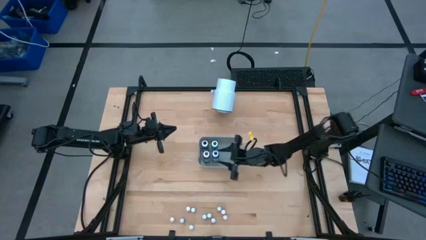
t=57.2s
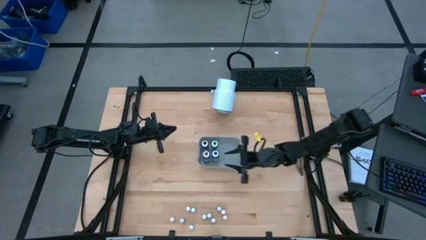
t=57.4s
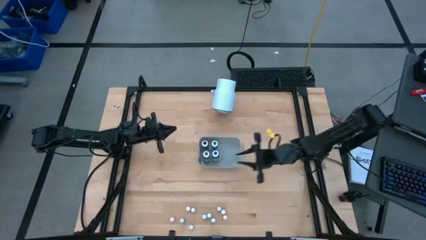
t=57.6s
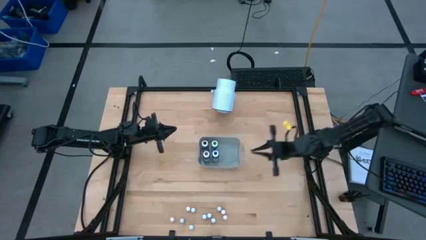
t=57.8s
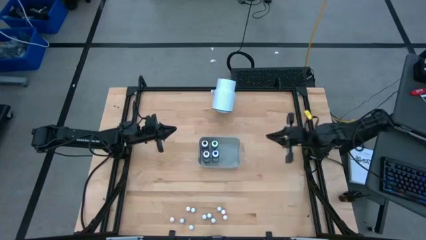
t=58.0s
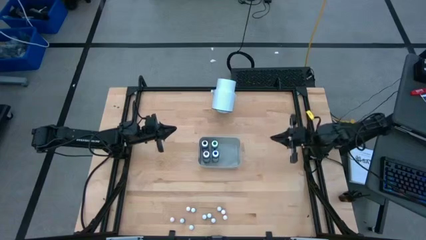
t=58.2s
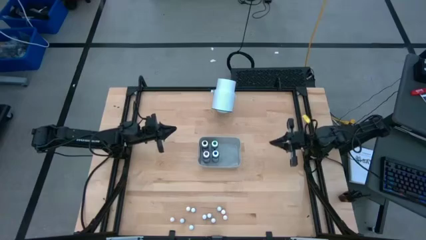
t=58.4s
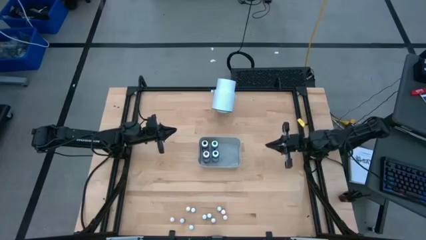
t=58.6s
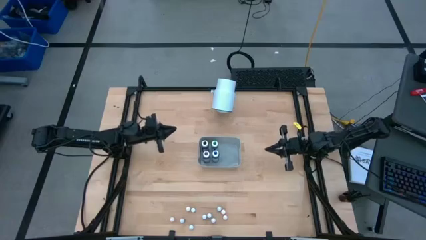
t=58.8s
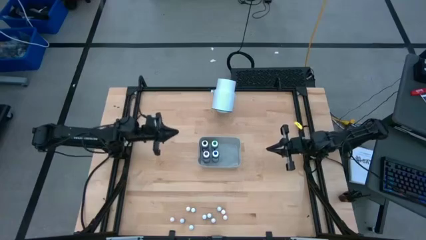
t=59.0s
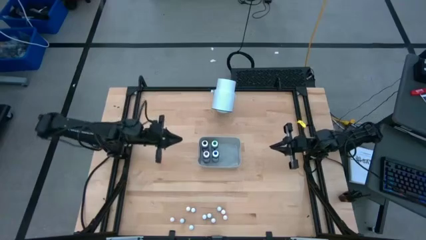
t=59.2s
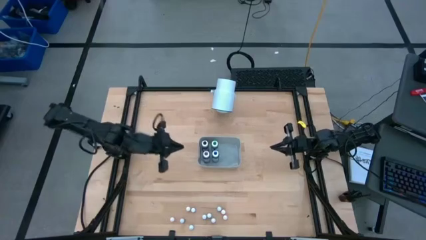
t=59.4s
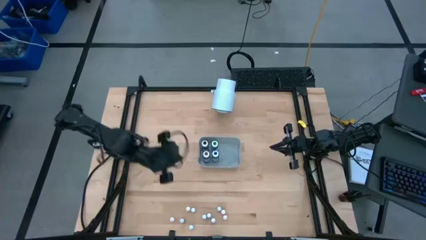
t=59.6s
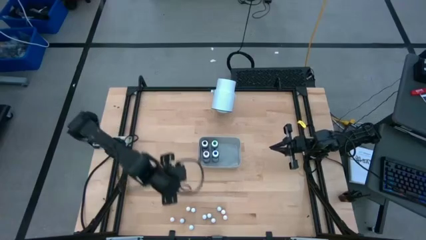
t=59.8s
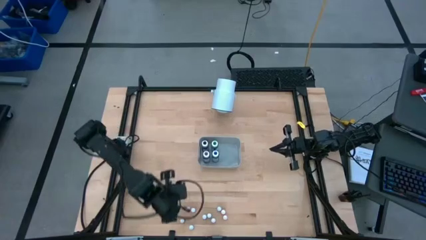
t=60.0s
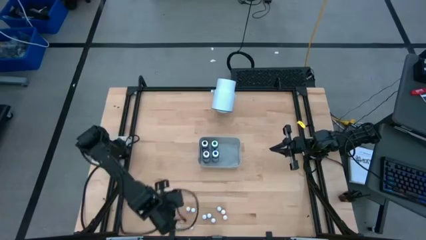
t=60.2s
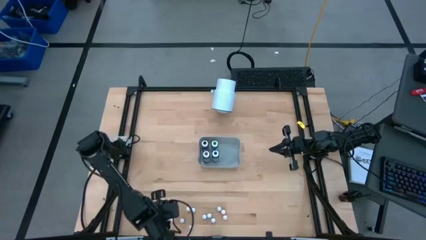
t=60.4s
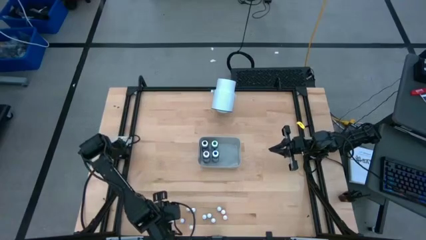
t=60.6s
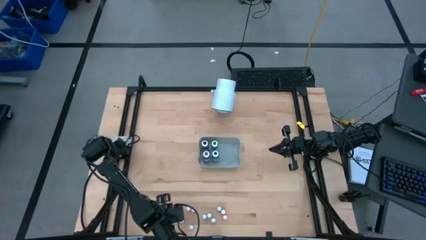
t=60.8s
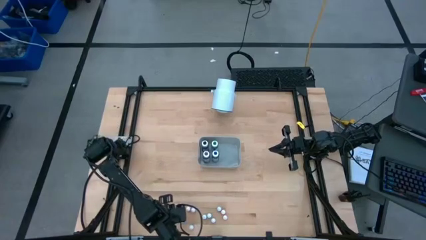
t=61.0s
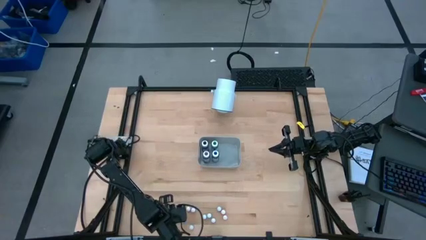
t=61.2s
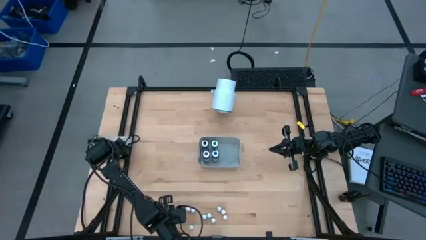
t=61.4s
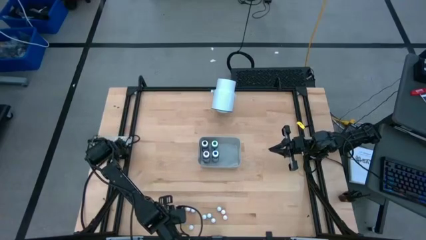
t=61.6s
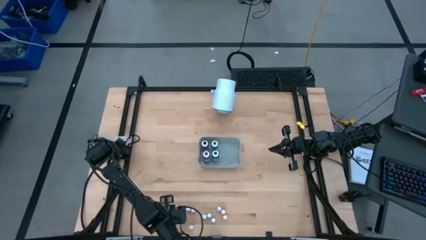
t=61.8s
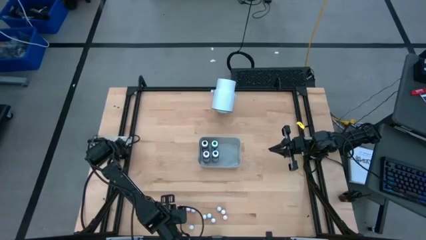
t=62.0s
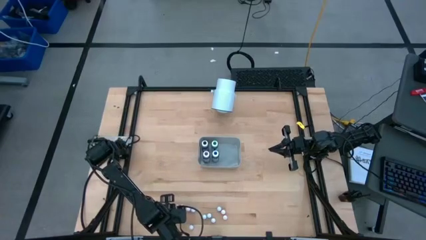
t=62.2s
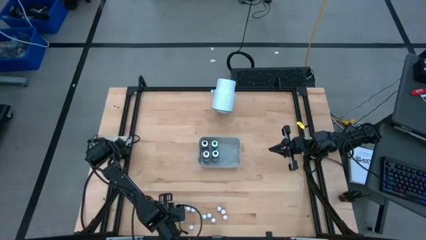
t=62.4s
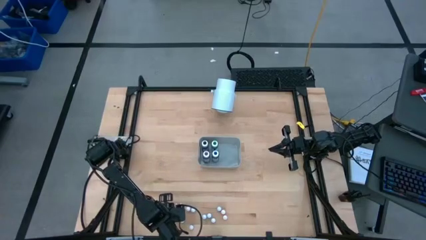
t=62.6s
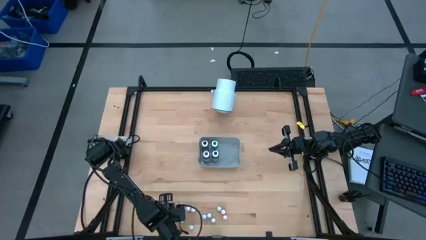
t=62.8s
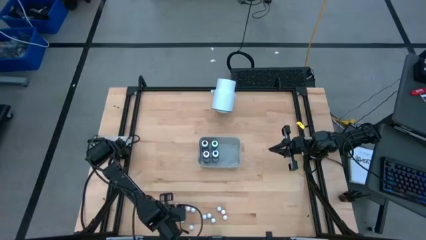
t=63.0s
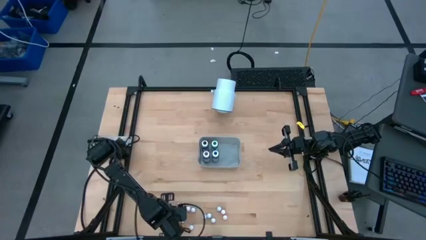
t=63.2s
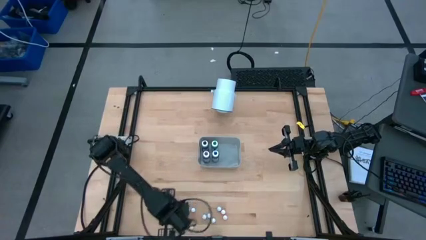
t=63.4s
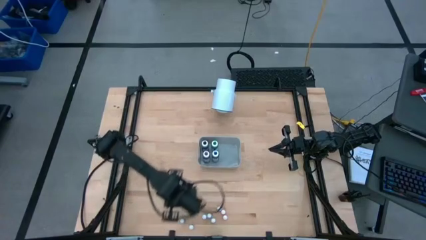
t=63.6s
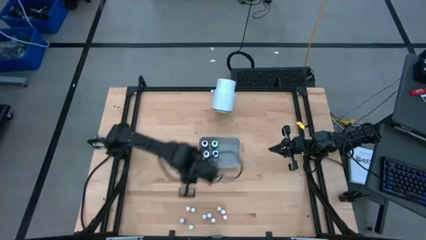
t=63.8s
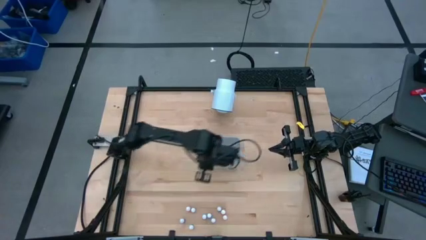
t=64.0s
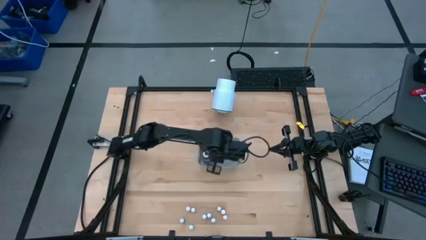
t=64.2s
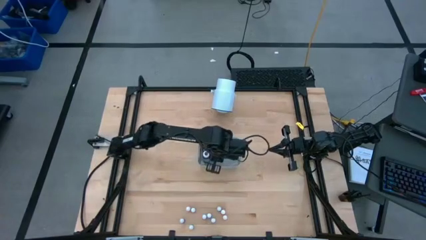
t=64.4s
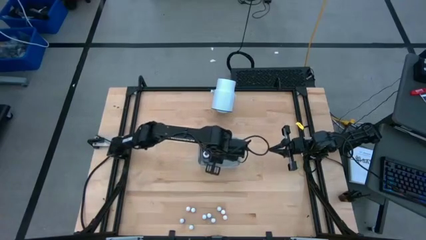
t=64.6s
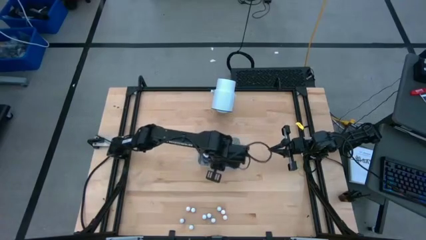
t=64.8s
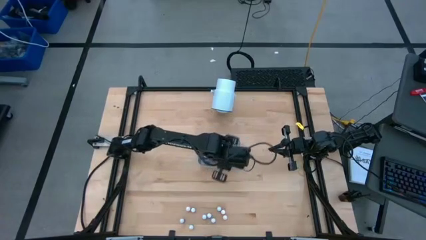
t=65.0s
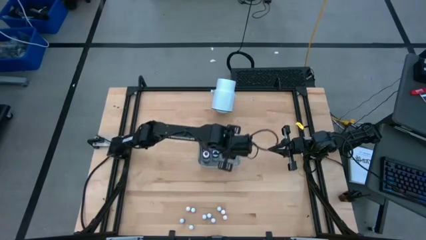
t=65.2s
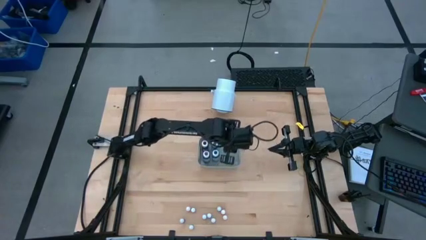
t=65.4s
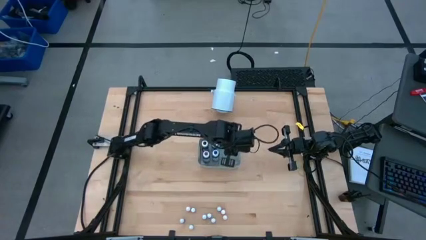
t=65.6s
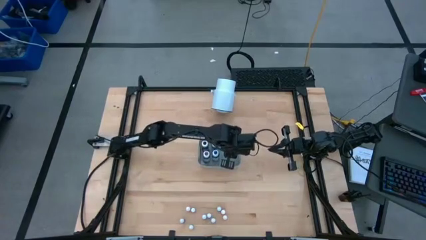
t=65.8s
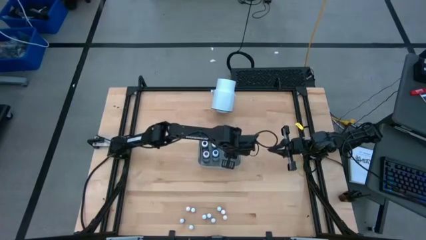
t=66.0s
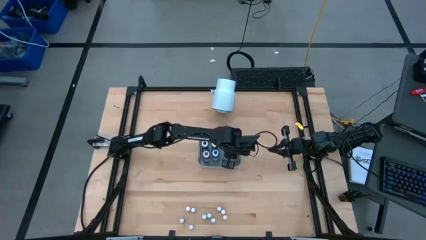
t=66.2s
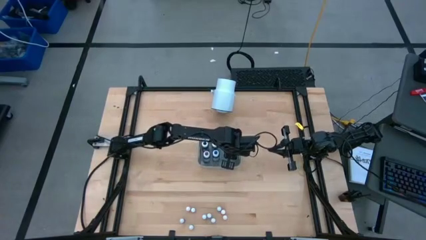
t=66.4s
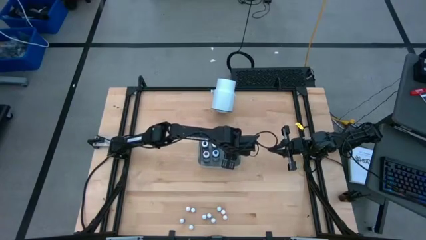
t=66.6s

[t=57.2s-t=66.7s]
Task: Pick & Place food coloring
Put the small yellow food coloring bottle into the gray bin

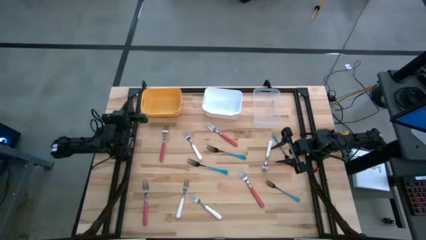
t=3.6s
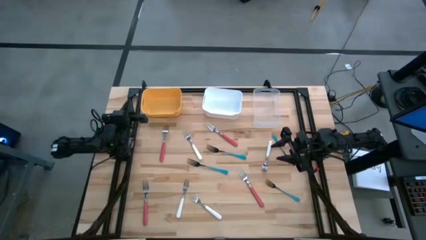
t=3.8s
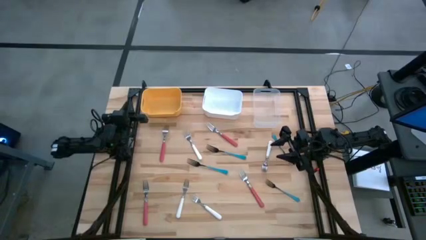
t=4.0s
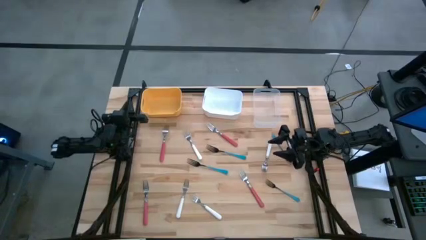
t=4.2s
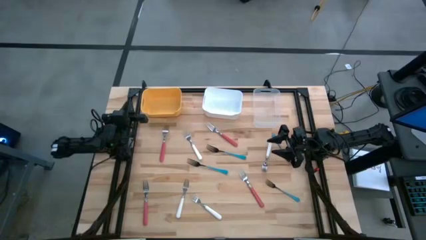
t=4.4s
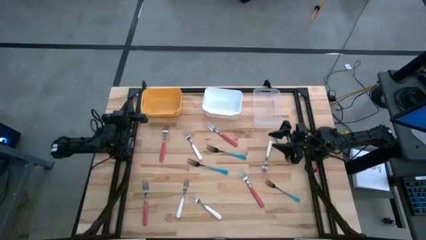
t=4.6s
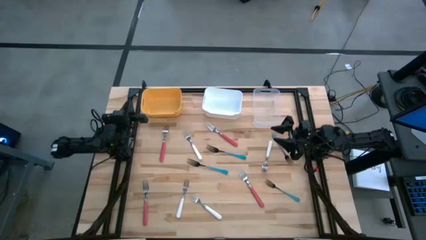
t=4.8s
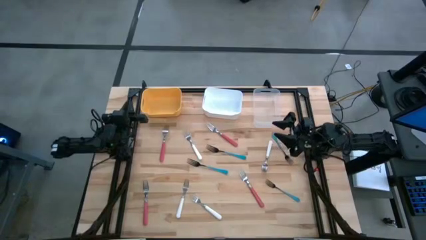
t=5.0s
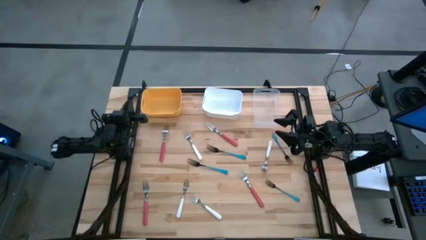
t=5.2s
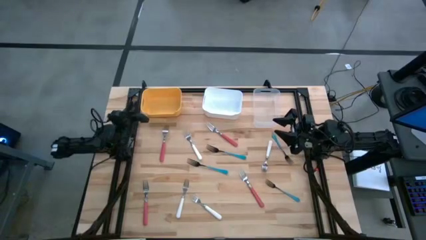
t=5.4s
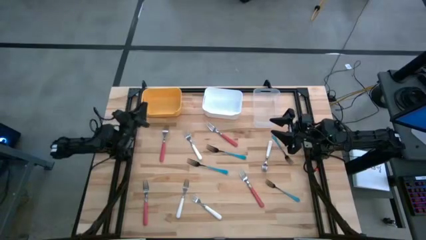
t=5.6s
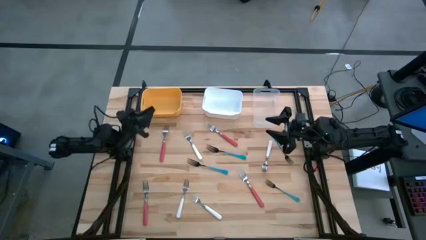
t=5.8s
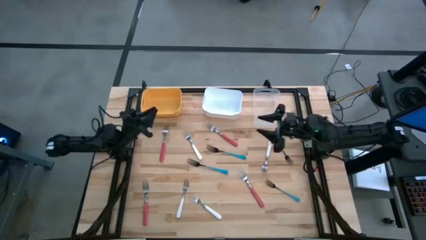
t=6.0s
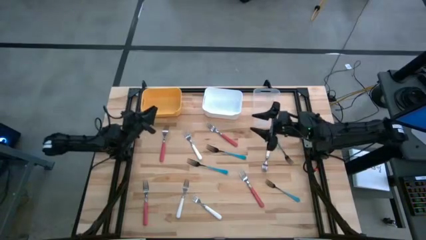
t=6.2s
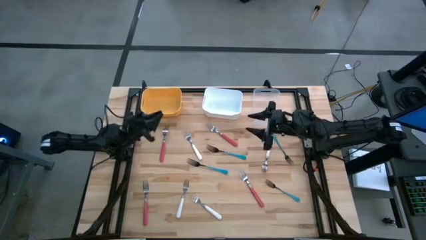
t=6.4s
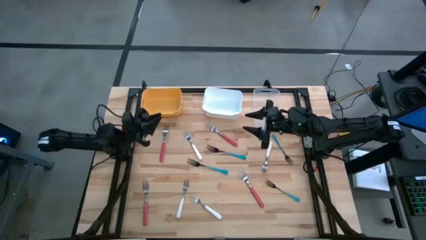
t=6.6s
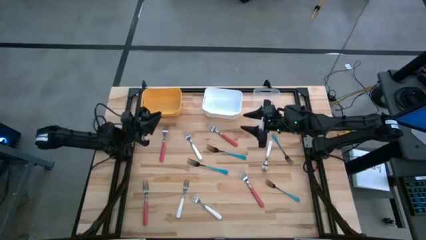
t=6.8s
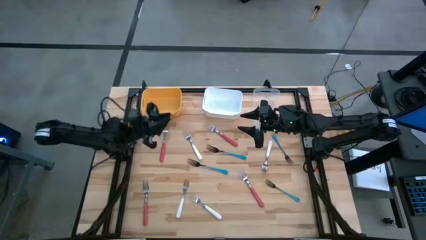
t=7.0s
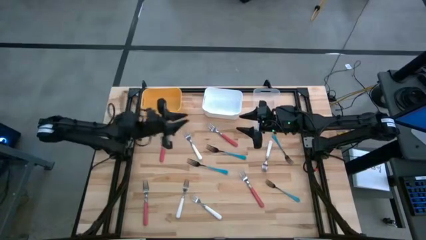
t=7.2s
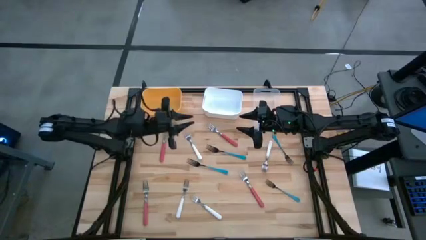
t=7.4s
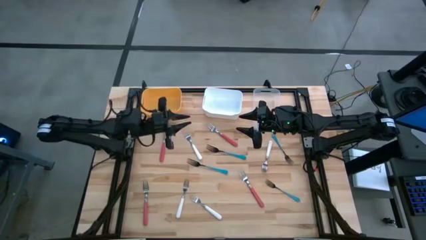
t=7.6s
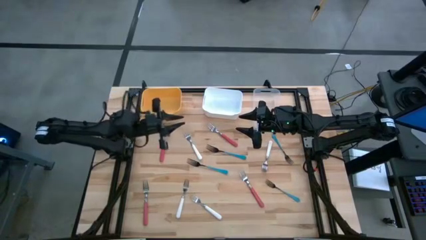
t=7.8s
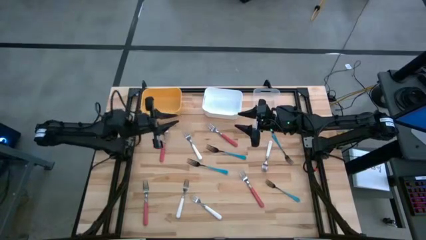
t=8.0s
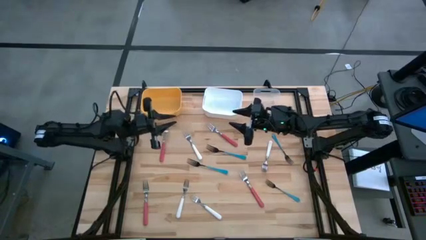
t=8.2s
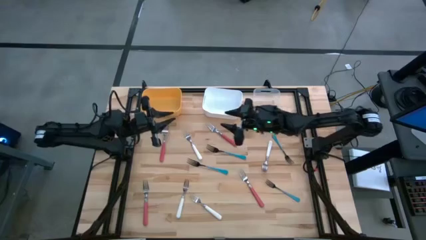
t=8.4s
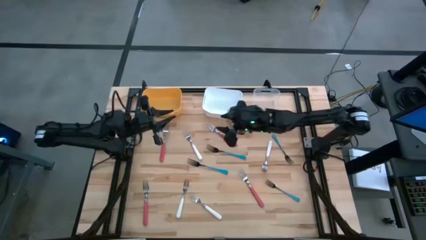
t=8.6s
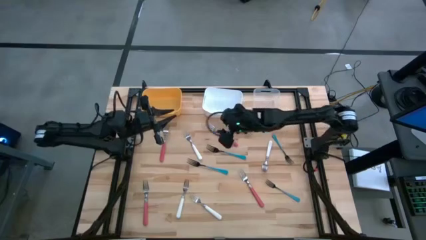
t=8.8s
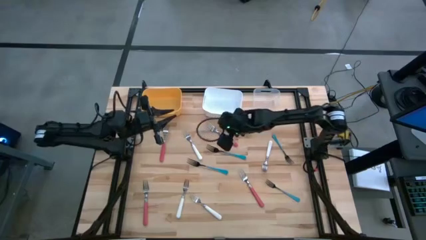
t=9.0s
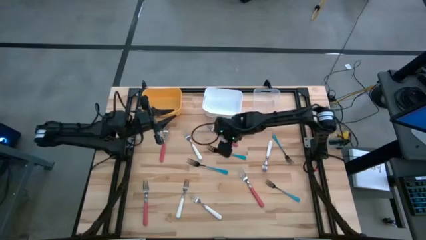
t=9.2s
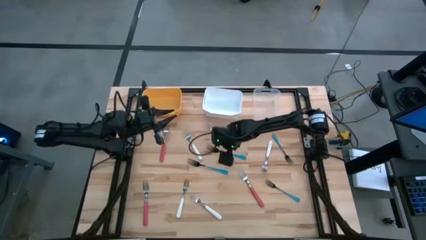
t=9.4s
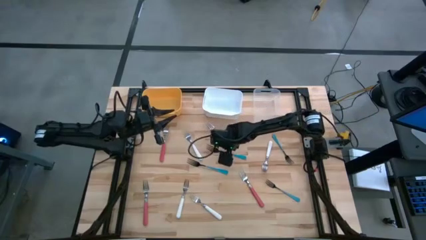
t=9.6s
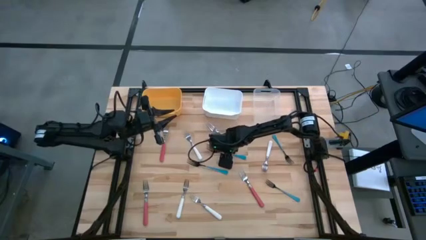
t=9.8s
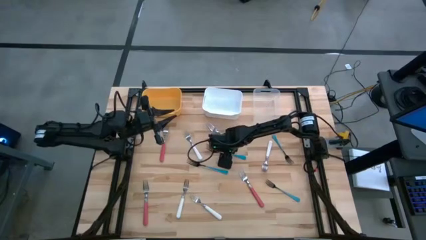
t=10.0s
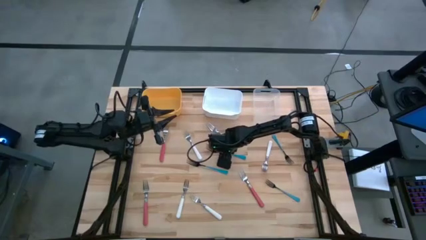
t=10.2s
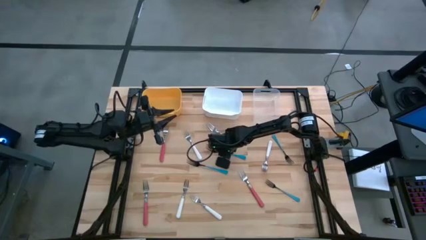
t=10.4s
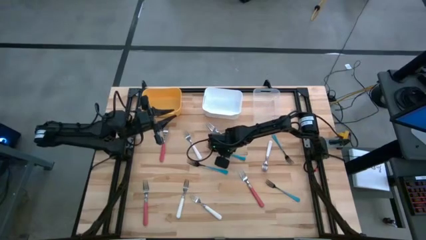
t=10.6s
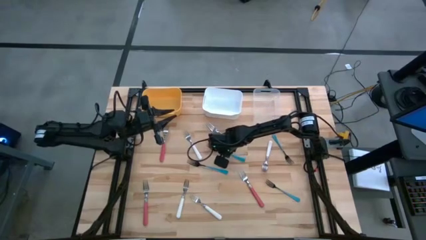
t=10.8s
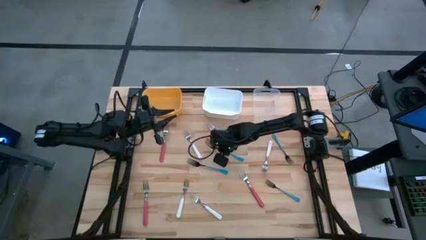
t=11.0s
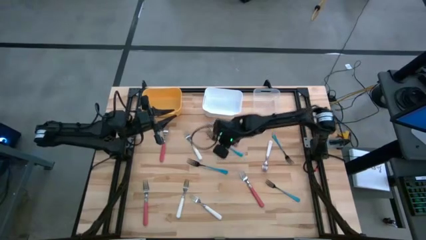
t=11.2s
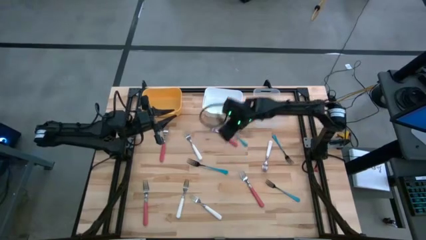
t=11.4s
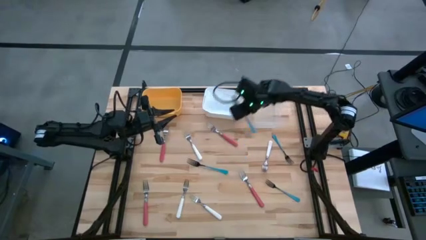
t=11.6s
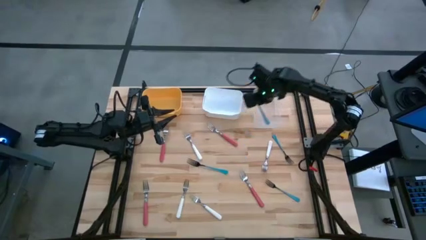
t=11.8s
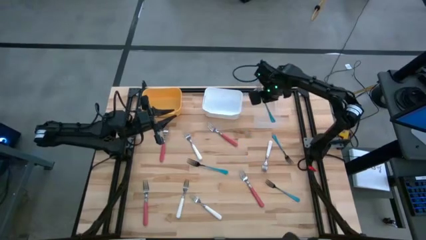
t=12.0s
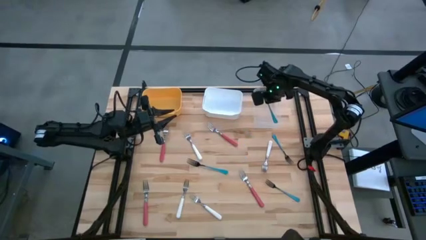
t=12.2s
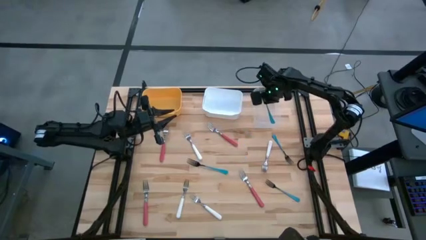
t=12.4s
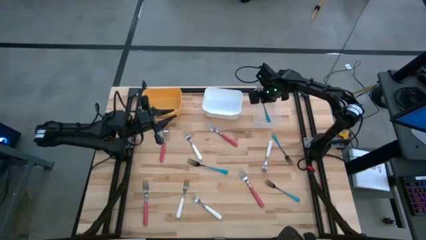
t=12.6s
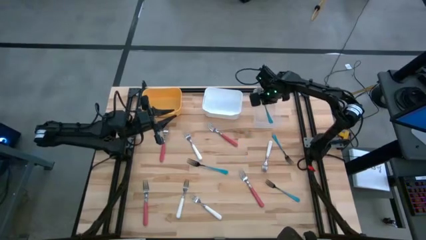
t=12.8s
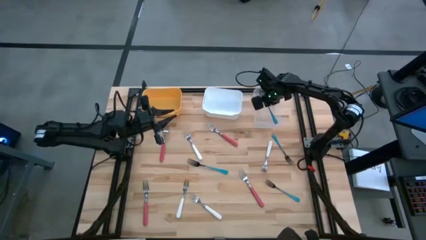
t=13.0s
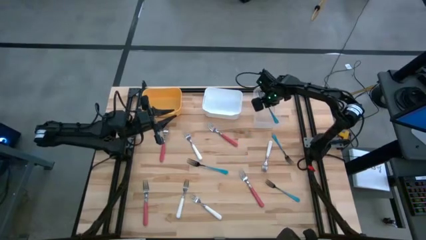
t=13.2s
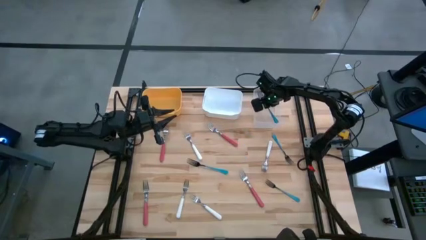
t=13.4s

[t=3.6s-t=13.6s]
Task: Sort silverware by color (type)
Put the blue fork into the transparent bin
